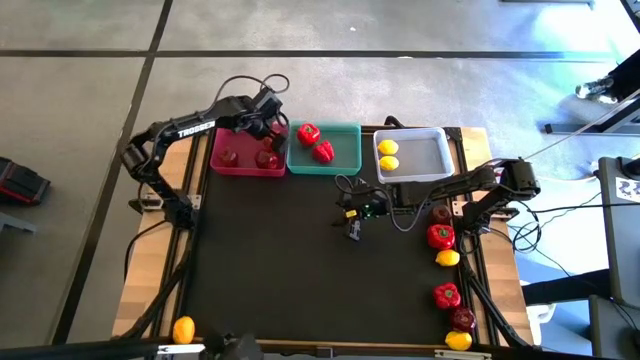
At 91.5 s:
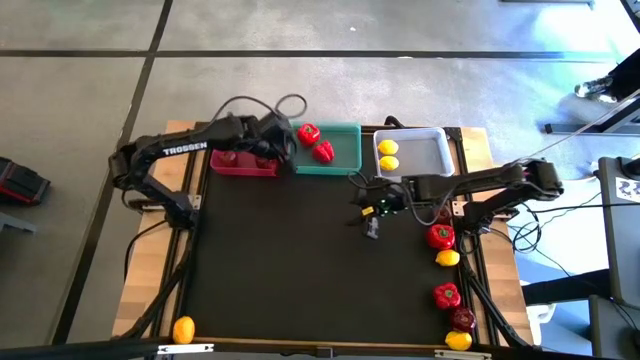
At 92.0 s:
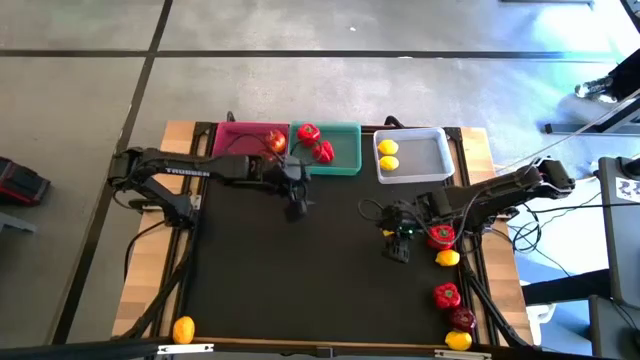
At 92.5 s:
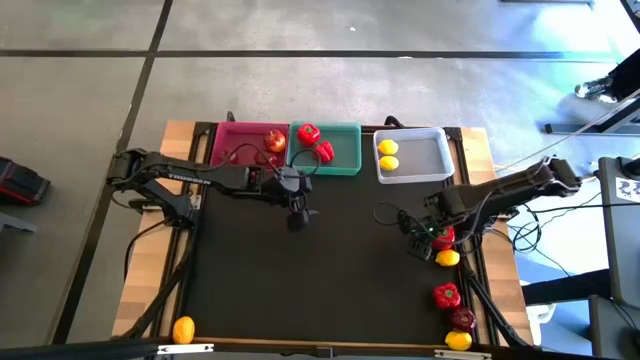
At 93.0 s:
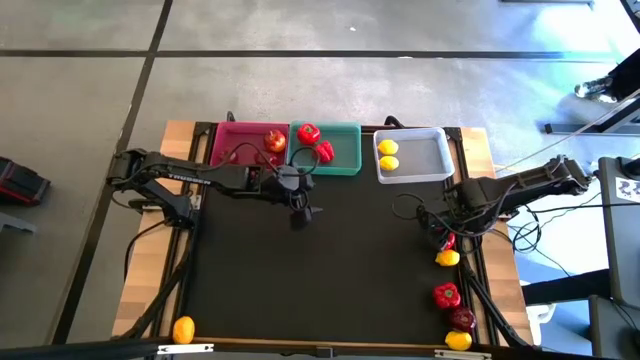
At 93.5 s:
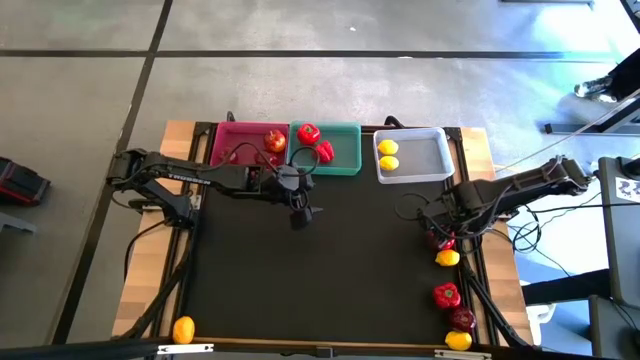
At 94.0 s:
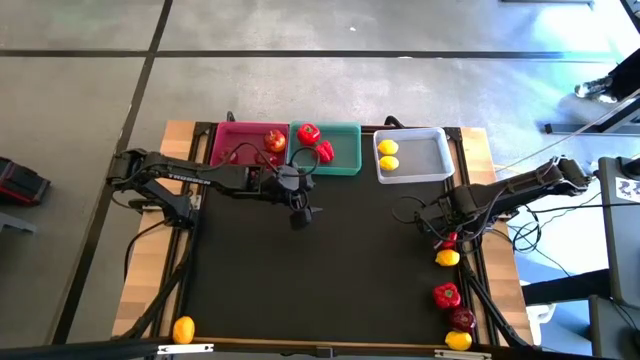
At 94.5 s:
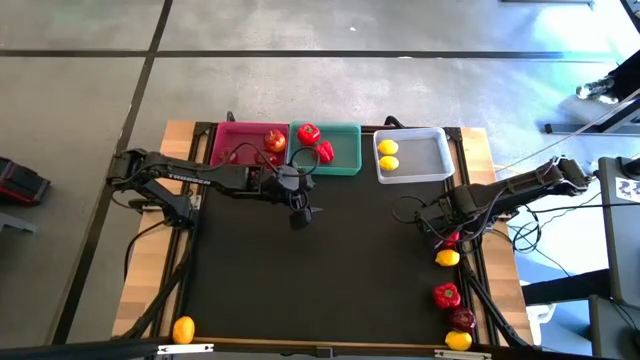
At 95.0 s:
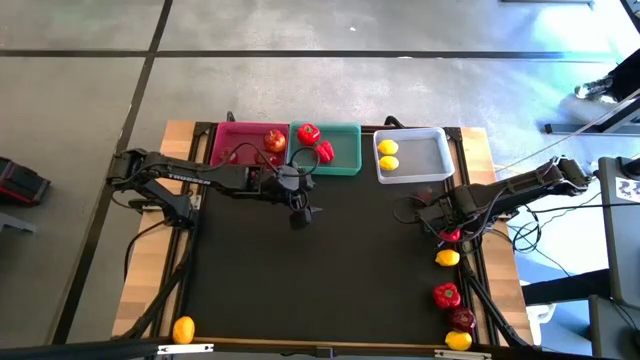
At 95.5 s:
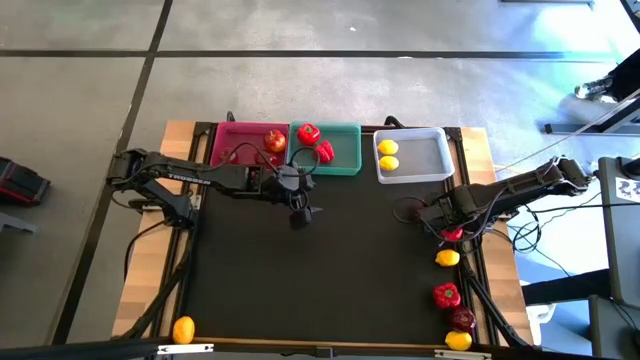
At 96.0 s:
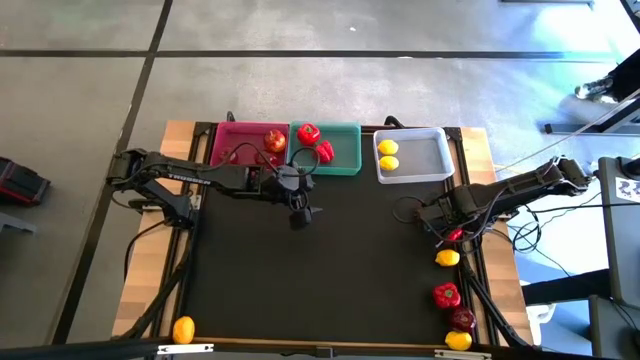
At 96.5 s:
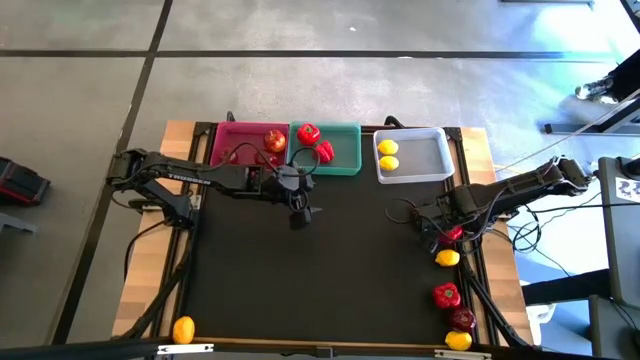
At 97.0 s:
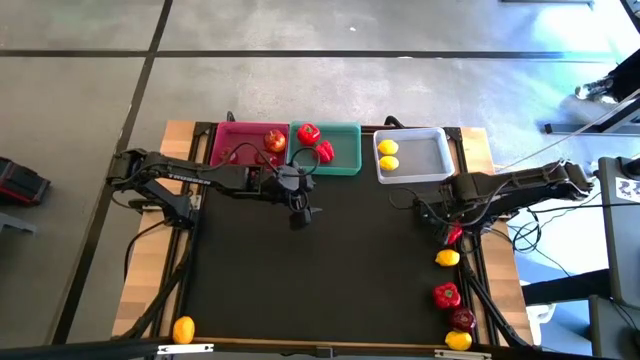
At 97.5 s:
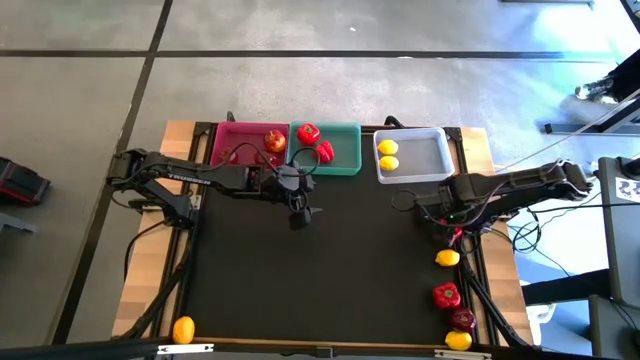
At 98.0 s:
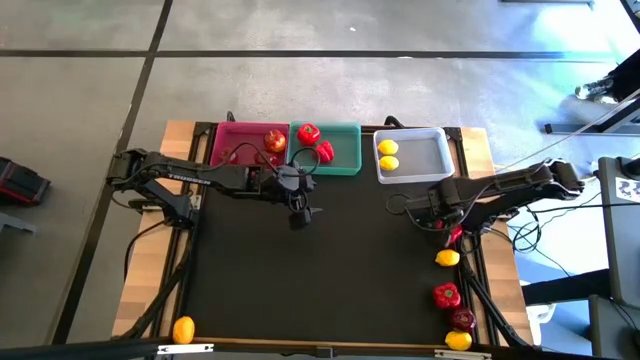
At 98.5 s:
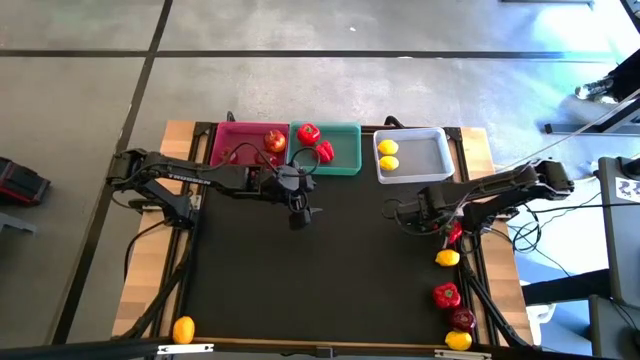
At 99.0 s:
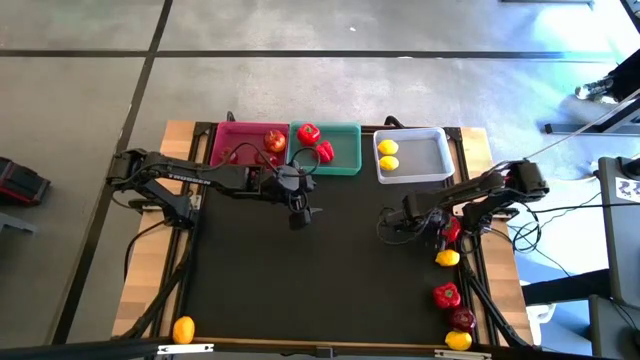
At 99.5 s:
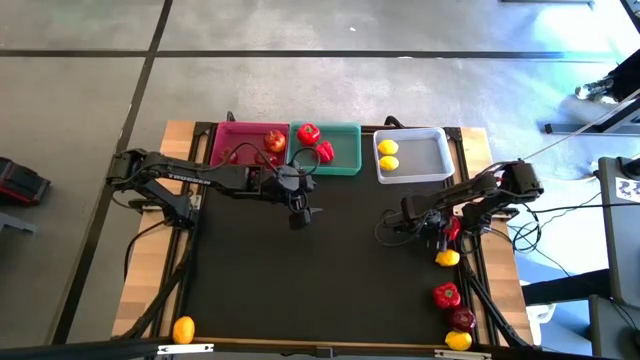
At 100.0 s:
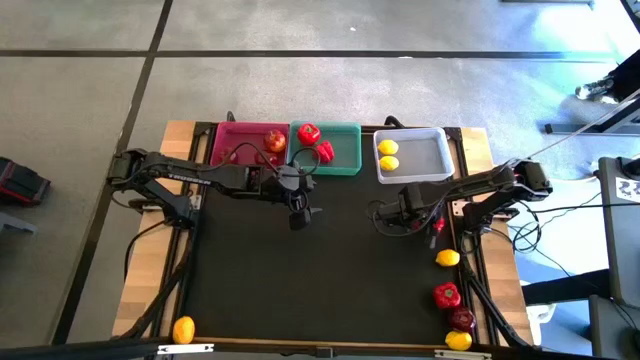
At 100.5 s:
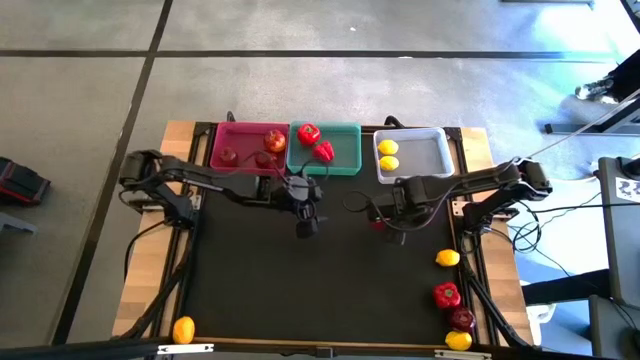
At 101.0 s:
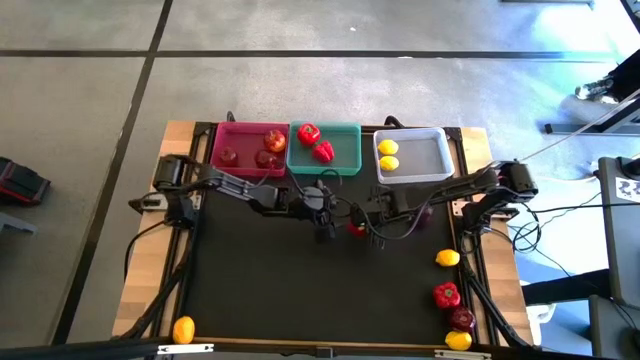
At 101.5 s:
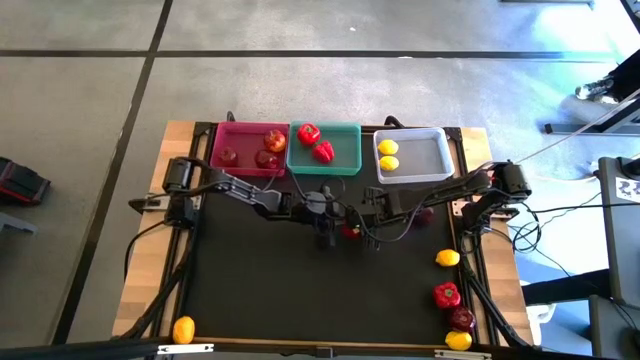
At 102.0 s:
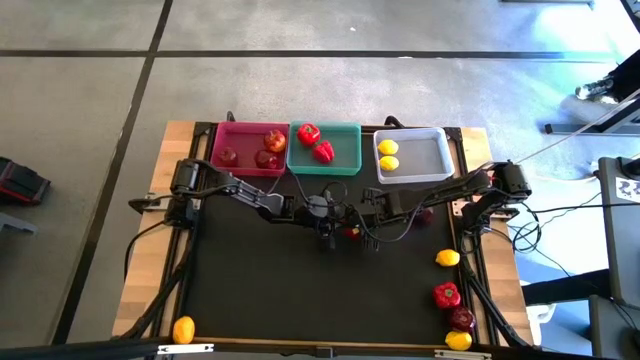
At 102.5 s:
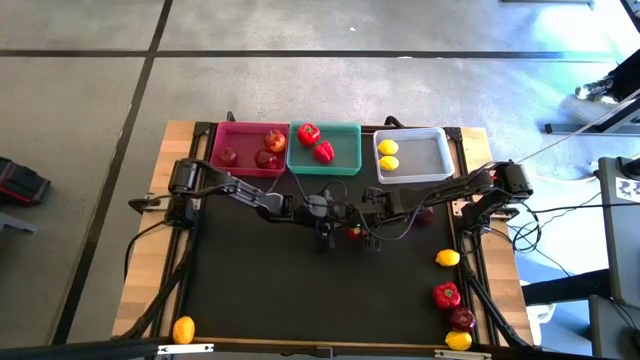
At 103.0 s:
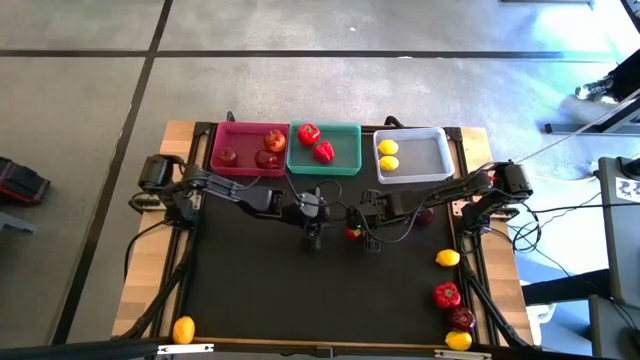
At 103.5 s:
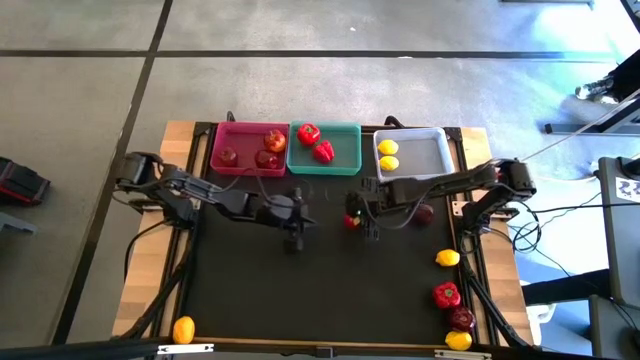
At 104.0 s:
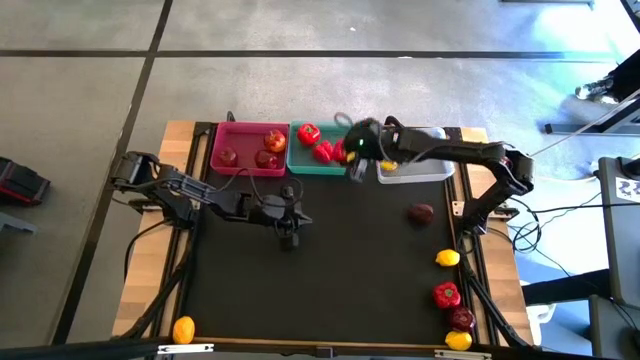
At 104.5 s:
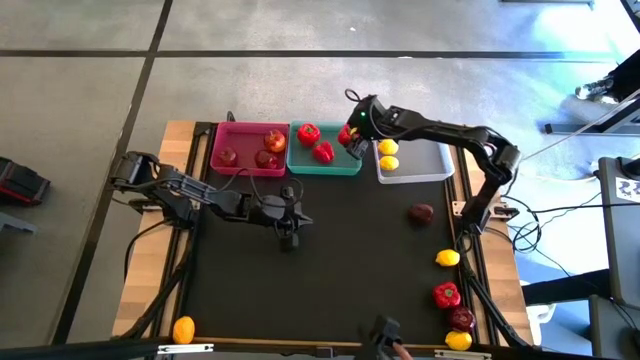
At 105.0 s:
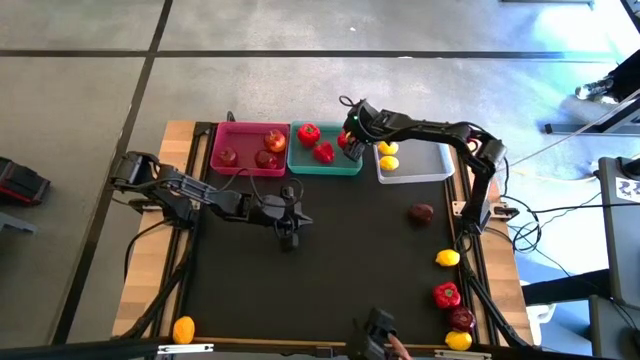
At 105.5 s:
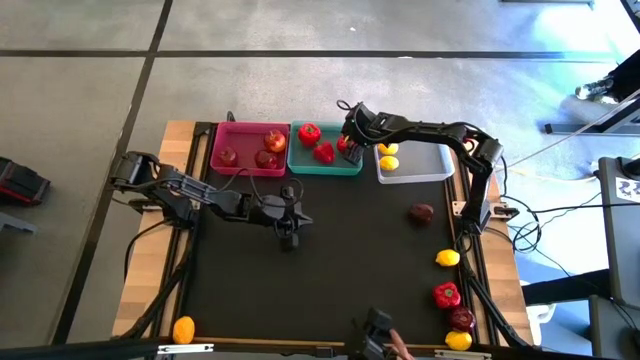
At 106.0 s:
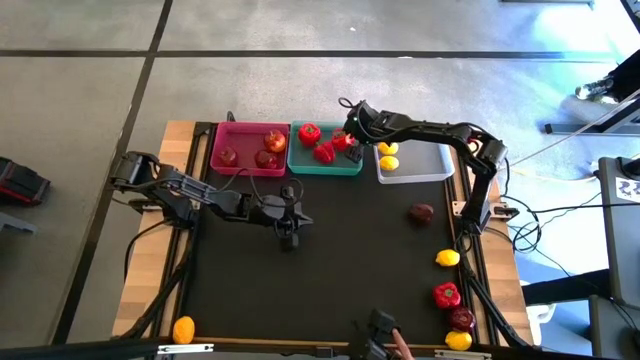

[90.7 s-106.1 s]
Task: Sort produce into baskets
Put the red bell pepper into the green bin

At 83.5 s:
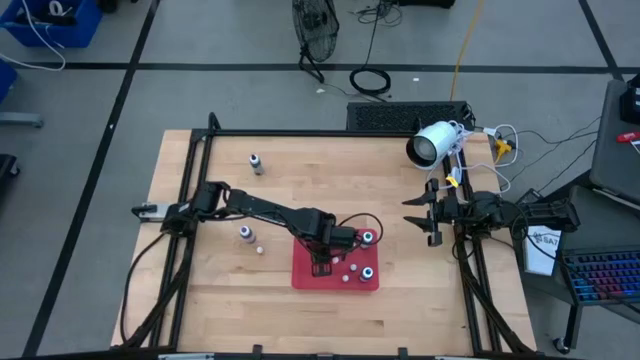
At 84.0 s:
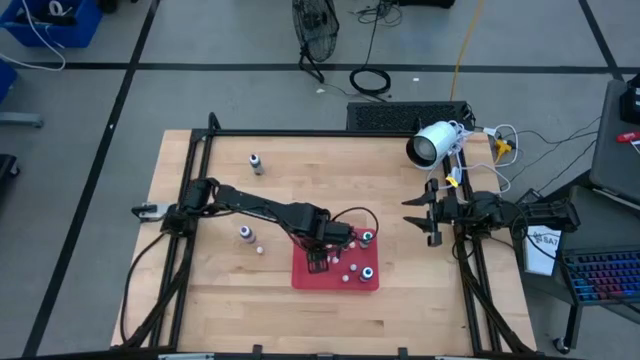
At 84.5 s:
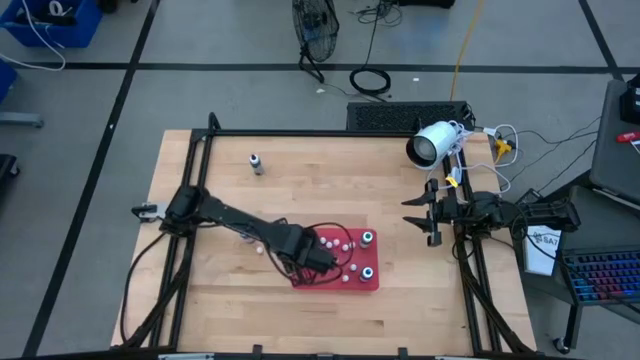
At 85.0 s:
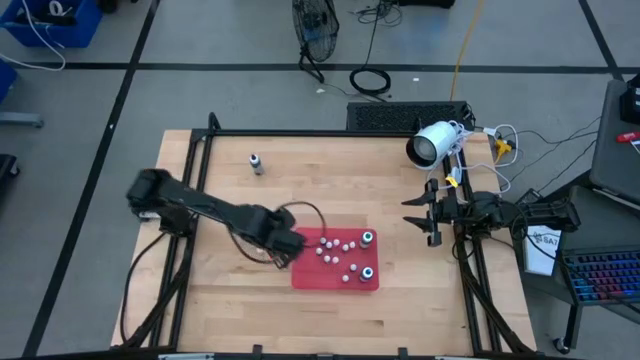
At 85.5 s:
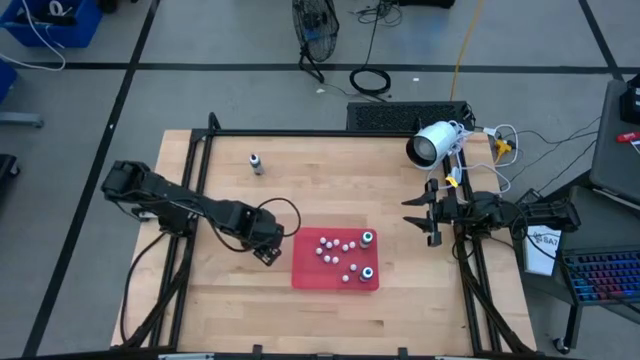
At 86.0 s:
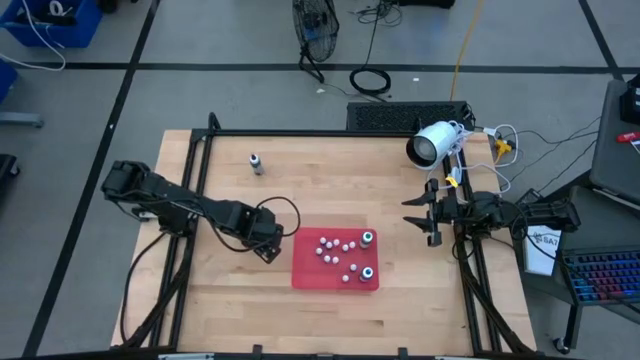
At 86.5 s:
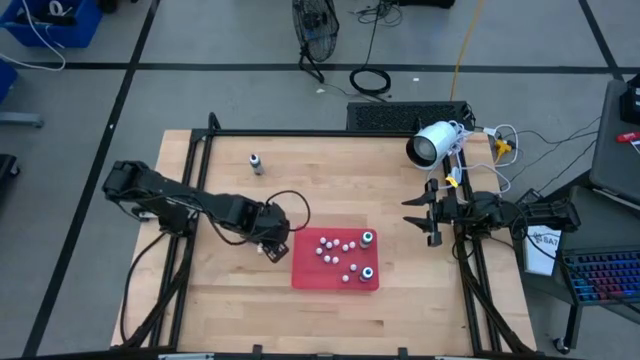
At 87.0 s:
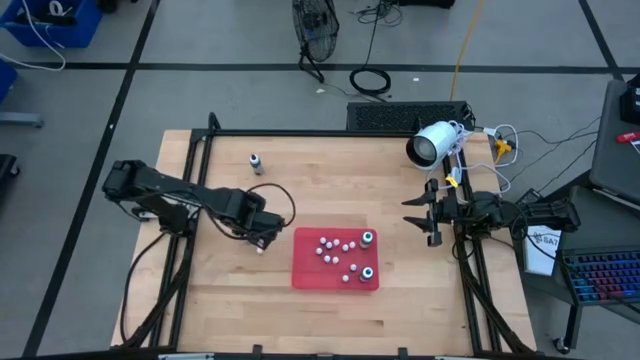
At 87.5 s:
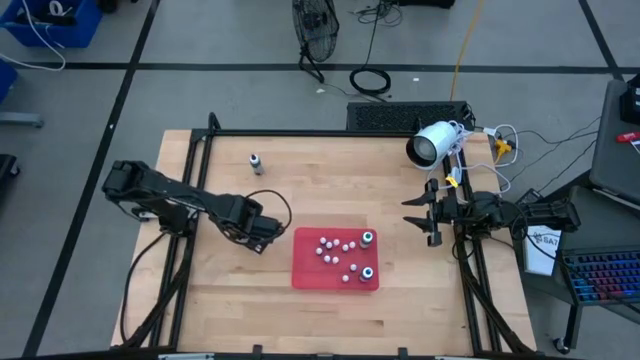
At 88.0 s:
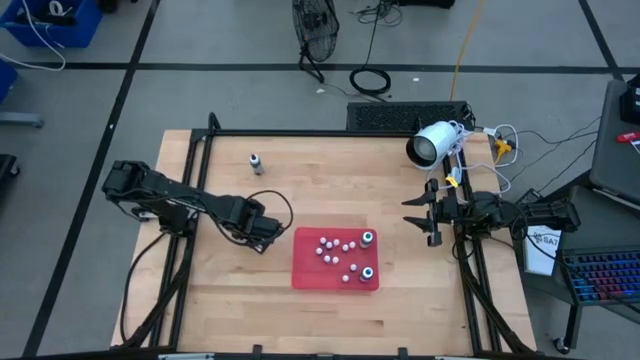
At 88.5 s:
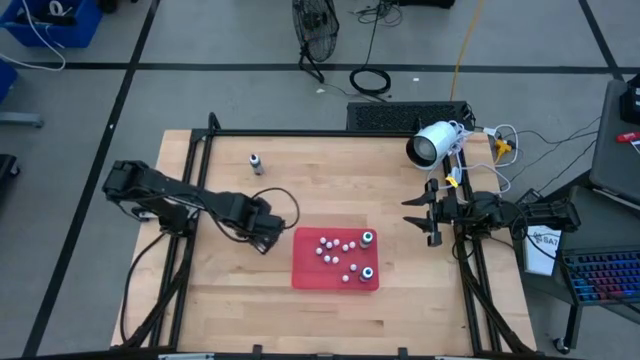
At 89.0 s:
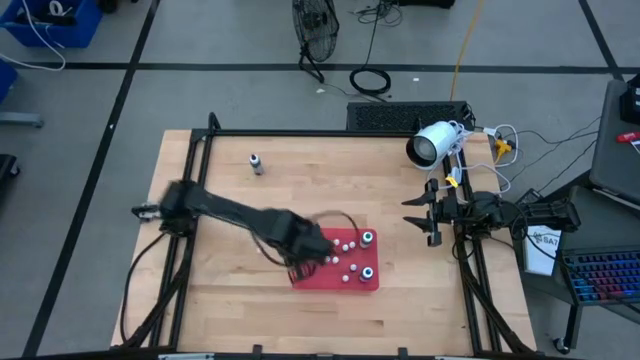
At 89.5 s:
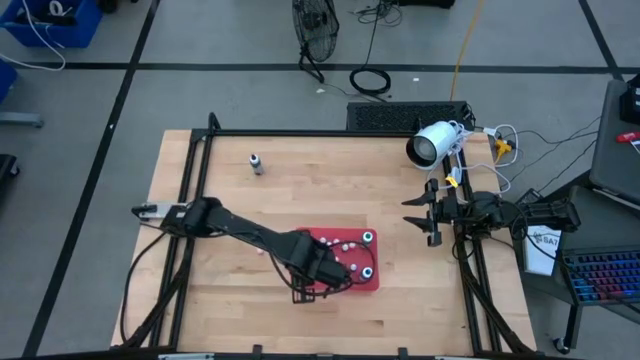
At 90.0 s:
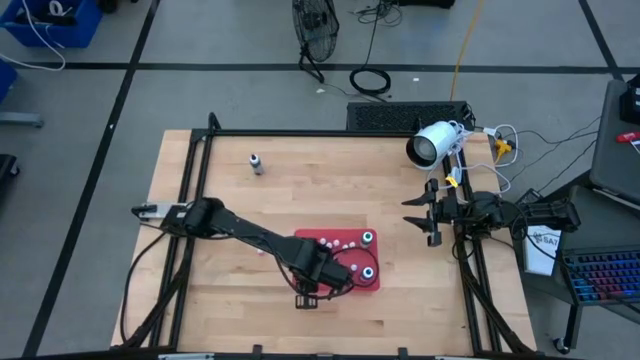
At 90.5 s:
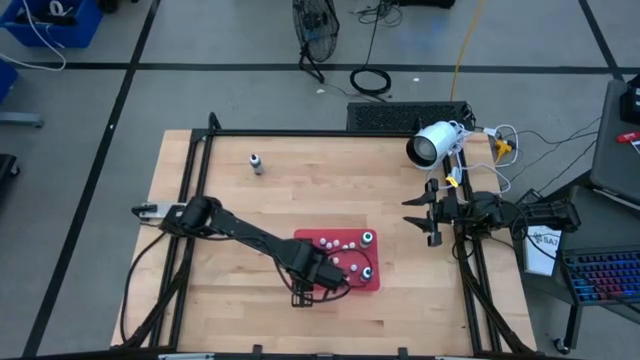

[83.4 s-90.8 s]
Task: Pick & Place food coloring
Put the large violet food coloring bottle into the red bin
